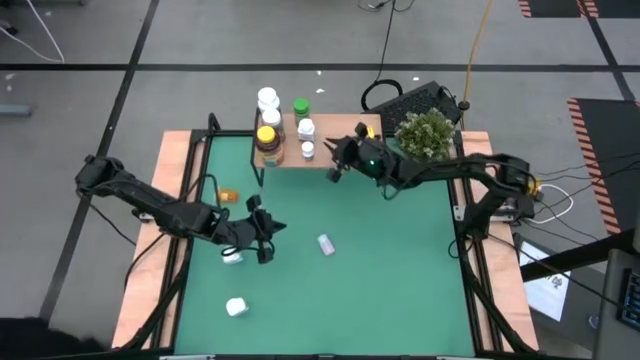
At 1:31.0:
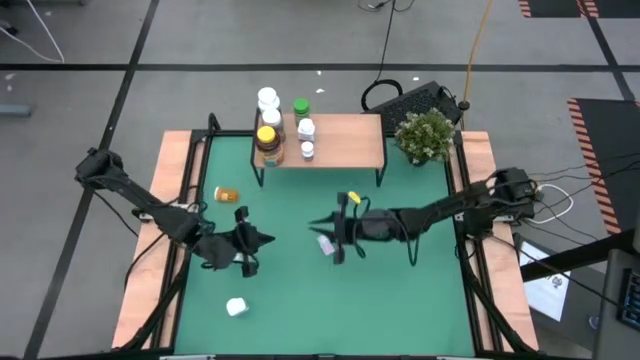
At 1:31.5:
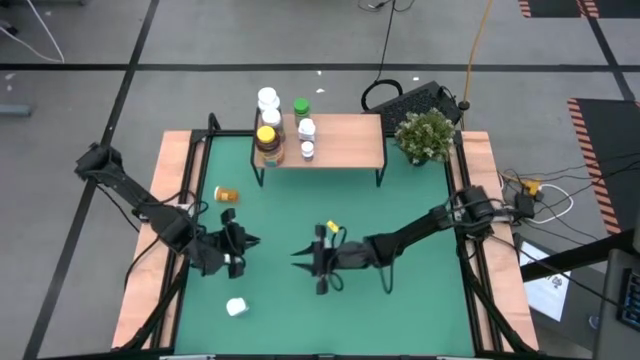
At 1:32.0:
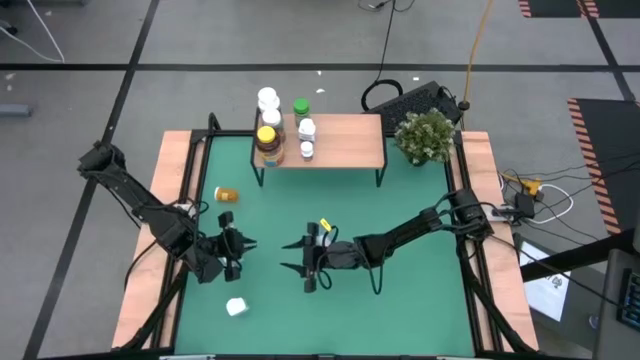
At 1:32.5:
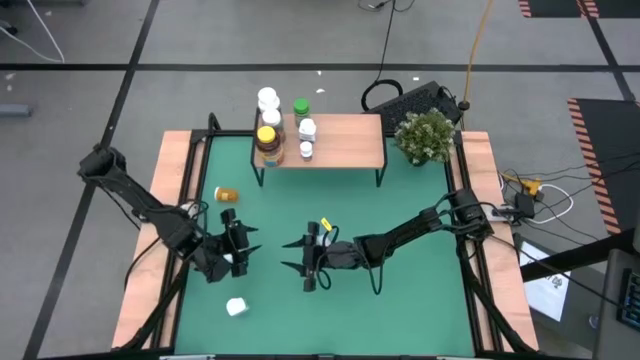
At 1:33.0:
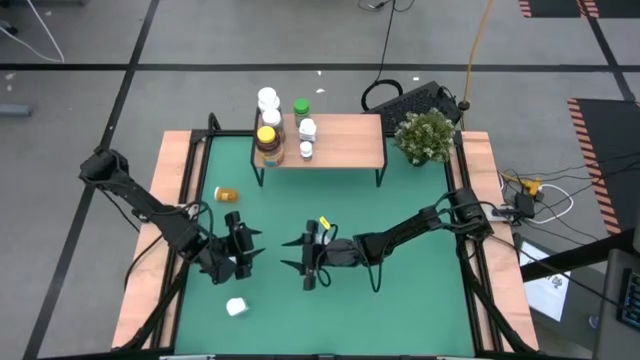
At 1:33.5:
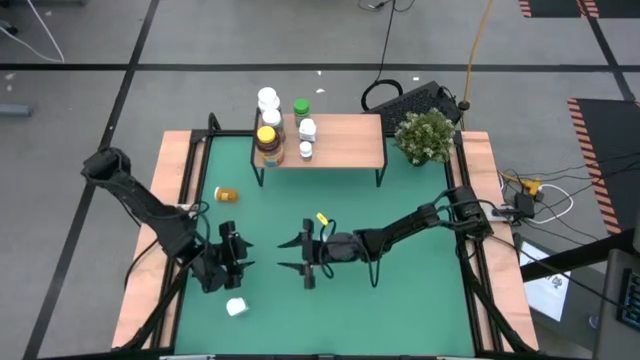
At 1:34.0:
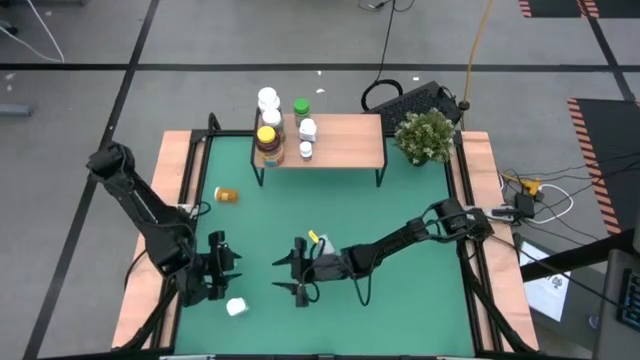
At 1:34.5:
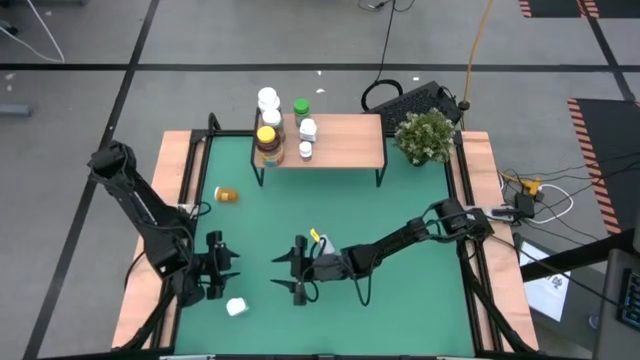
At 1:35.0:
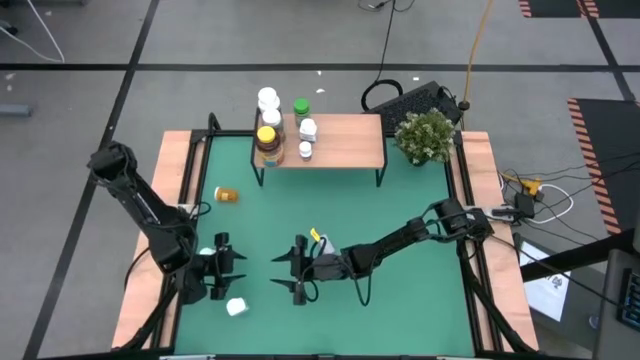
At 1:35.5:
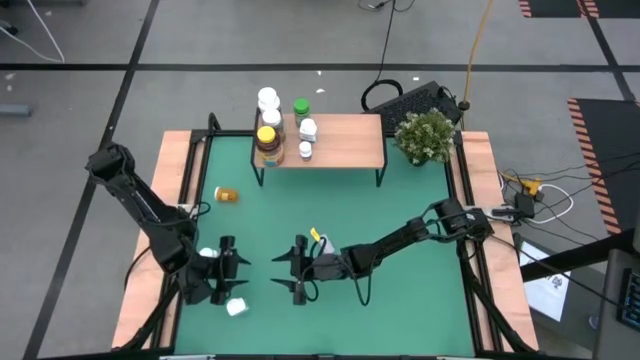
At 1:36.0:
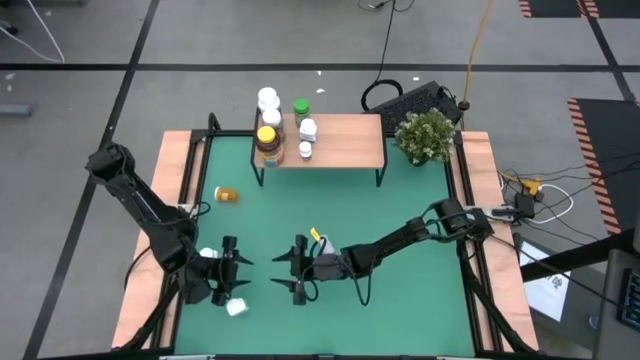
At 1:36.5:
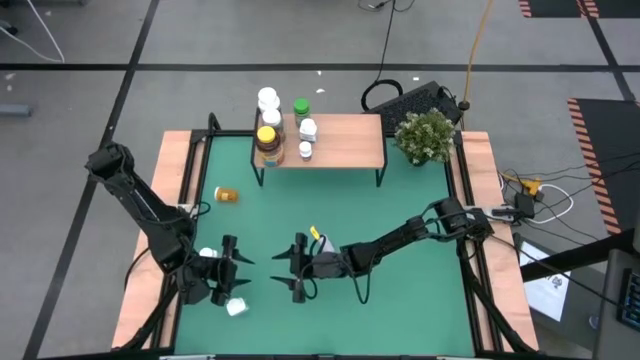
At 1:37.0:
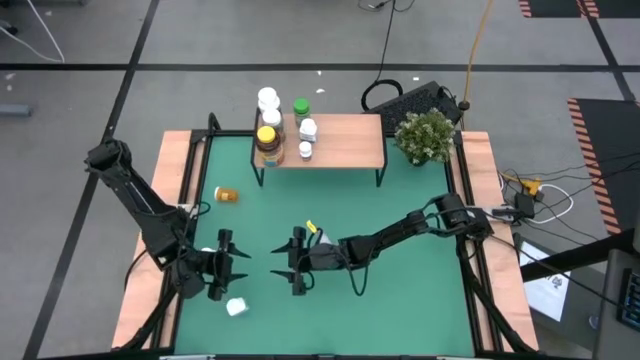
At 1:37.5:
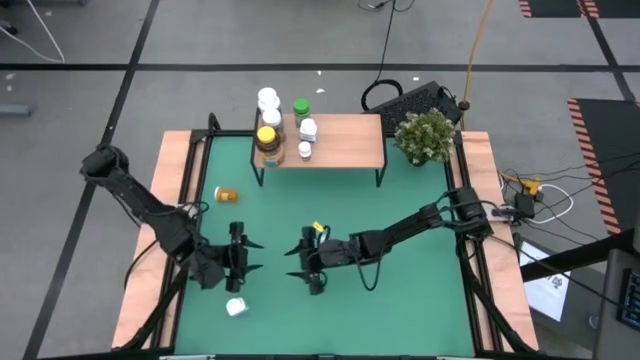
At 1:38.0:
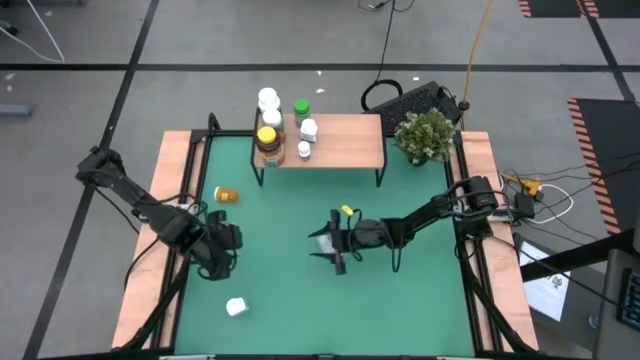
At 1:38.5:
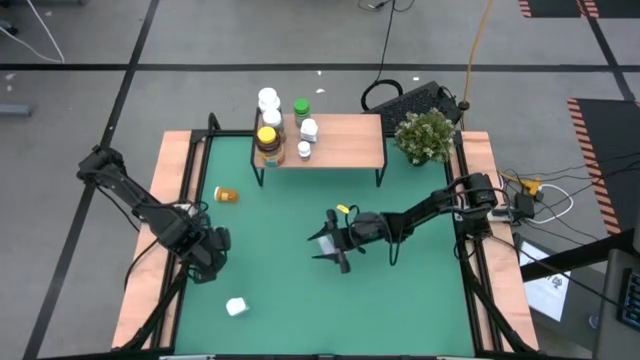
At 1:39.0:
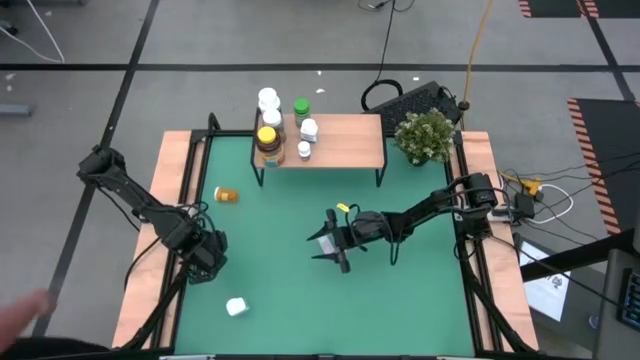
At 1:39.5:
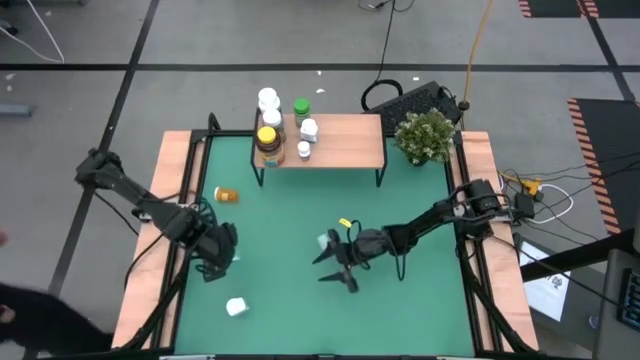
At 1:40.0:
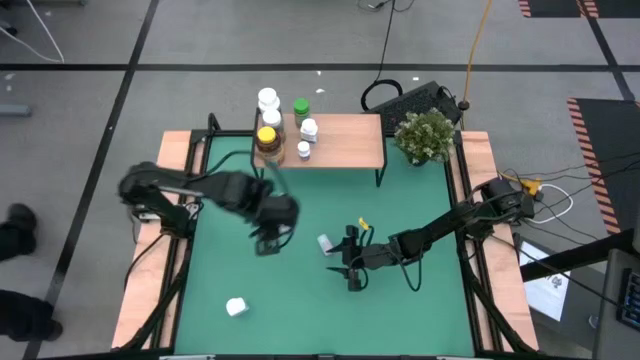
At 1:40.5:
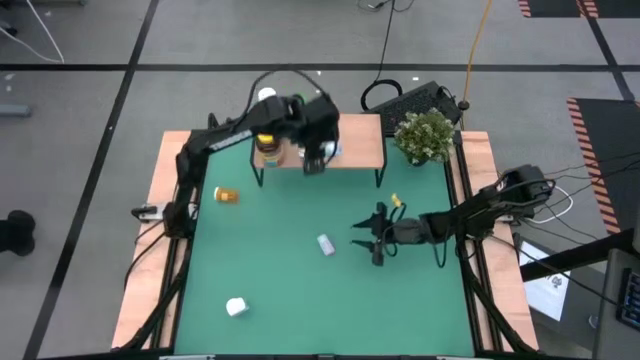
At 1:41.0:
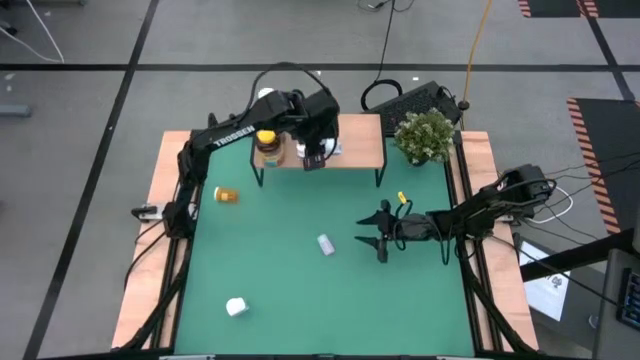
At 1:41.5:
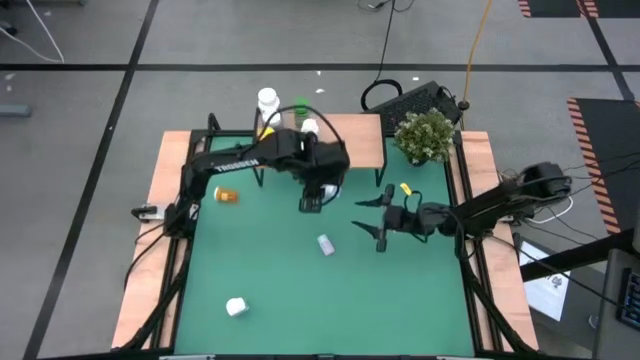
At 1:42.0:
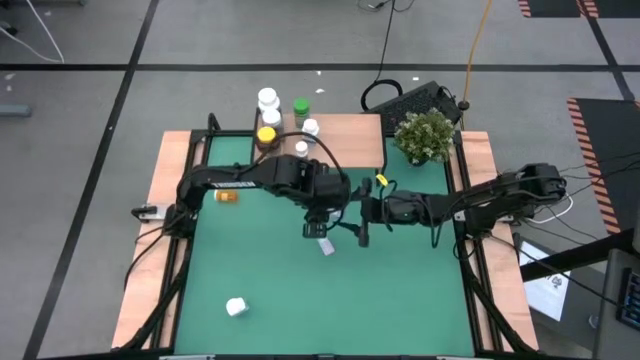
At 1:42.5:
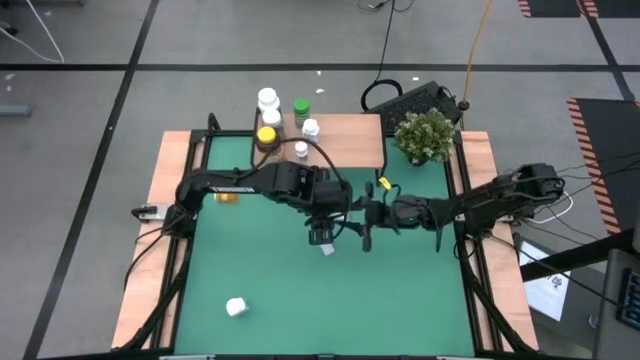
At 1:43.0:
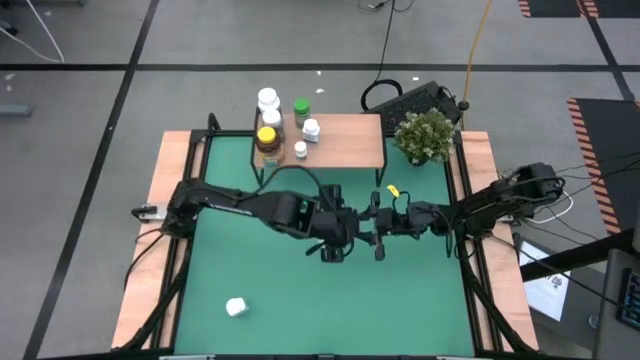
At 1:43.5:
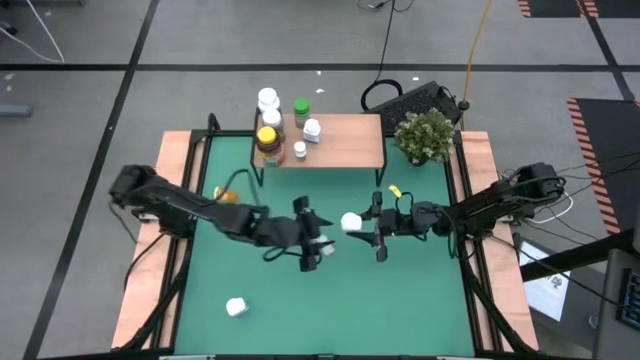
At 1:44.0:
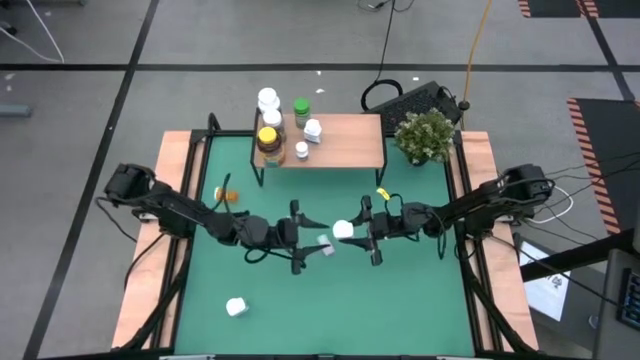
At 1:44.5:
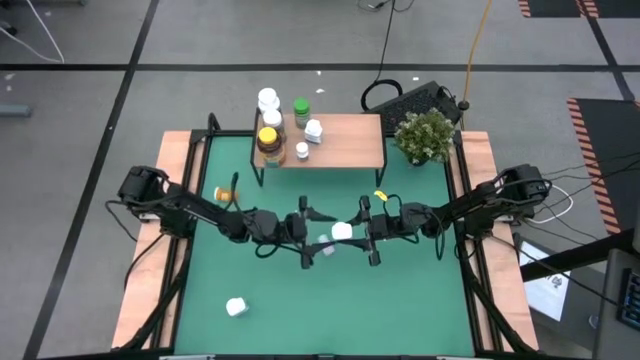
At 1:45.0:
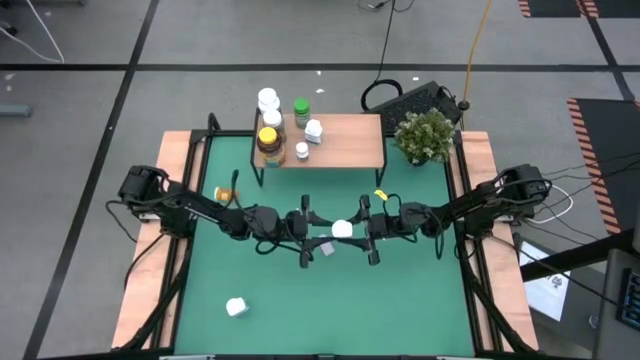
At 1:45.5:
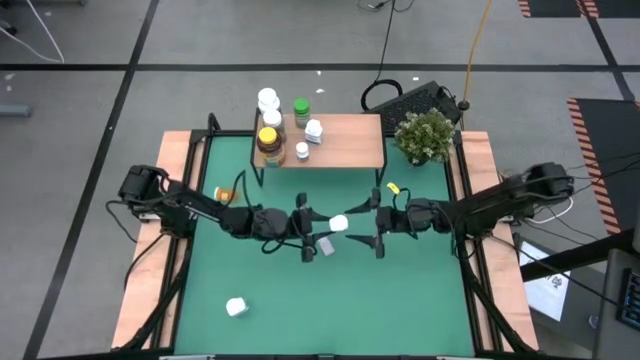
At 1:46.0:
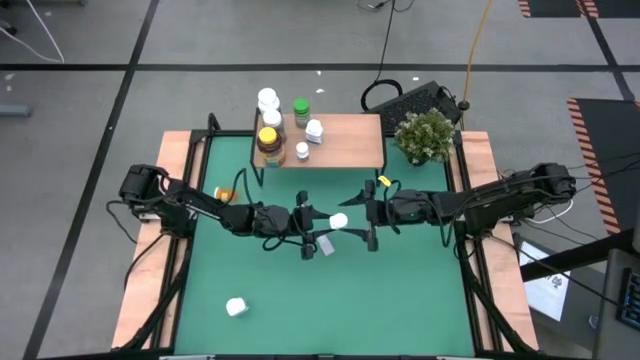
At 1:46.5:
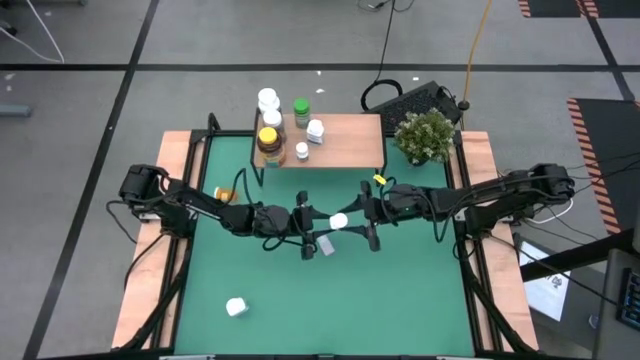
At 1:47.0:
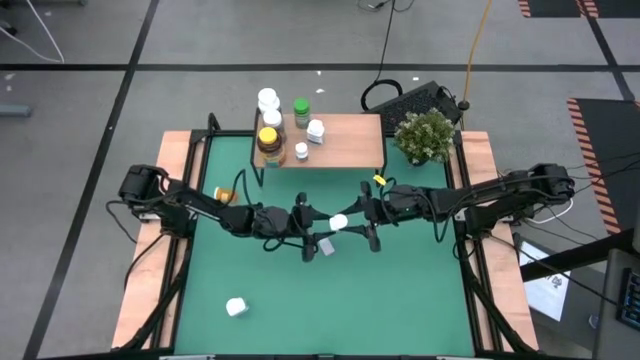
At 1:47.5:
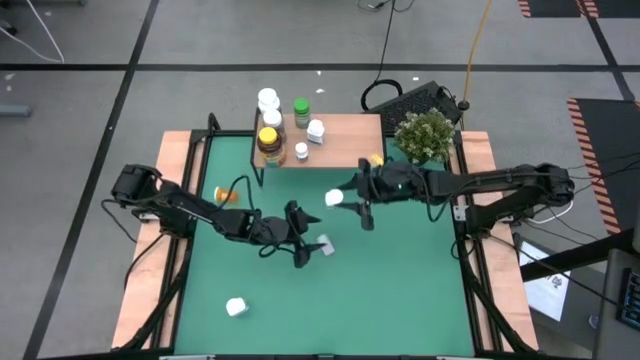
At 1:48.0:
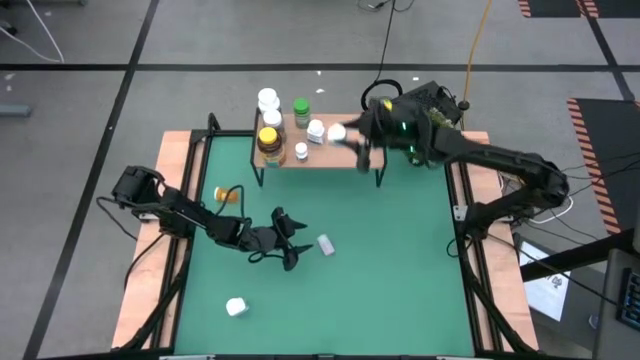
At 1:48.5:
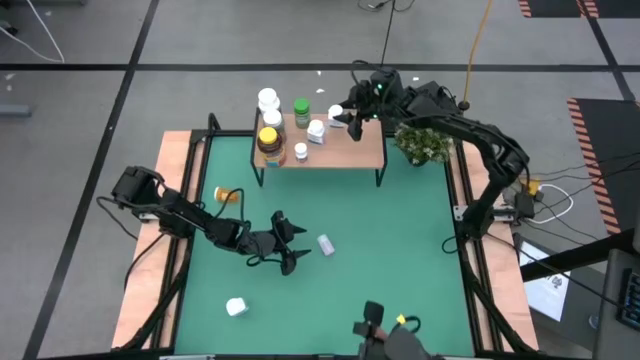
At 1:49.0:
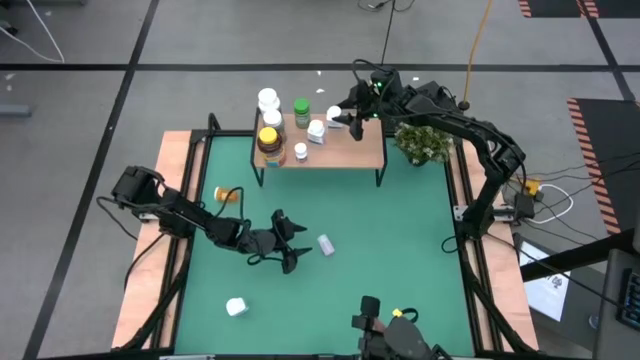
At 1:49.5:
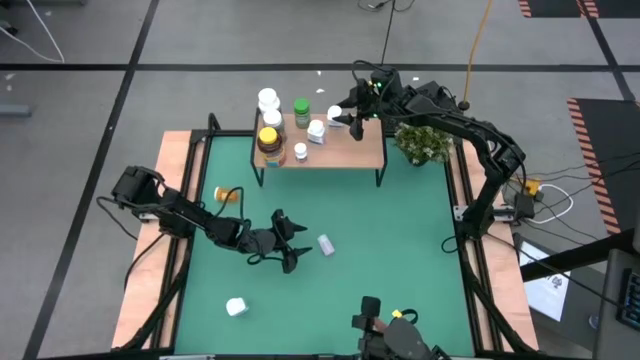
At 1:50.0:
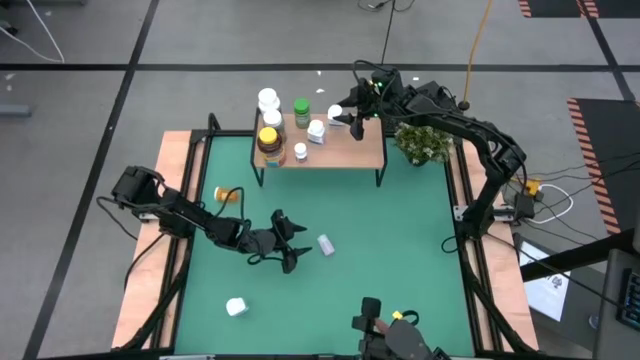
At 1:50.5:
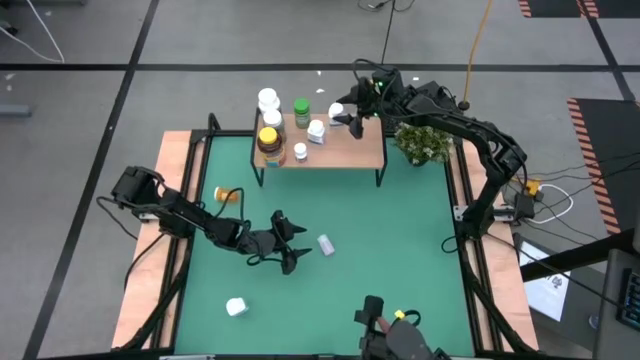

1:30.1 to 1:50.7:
Task: Pick and place medicine bottles onto shelf by color
Put the top white and blue pill bottle on the shelf

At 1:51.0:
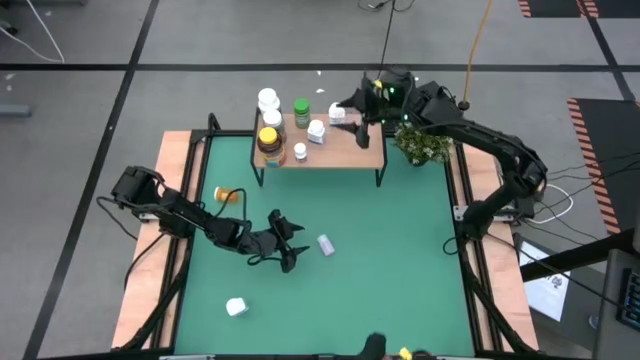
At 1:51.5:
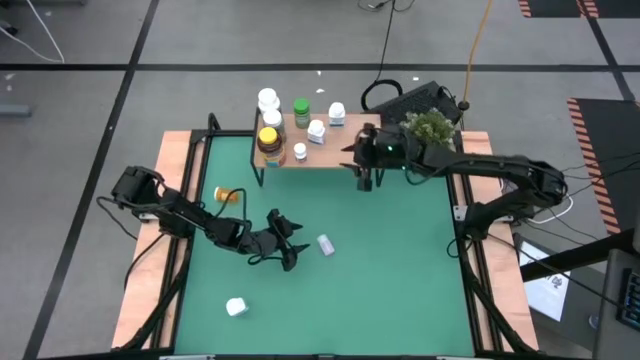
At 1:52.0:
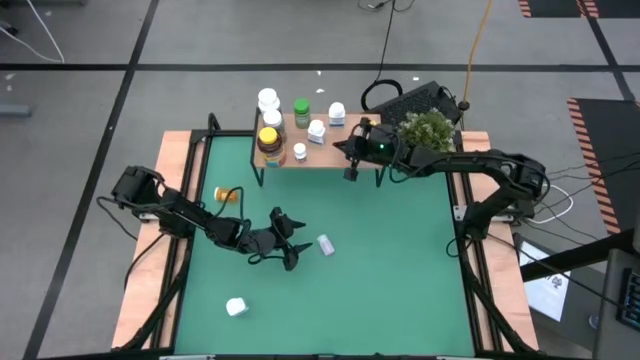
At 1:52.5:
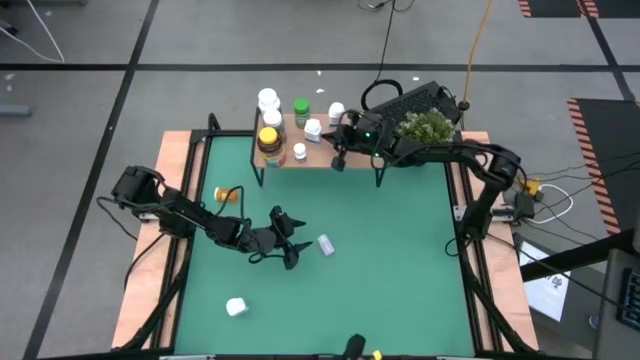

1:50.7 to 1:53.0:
Adjust the white and blue pill bottle on the shelf

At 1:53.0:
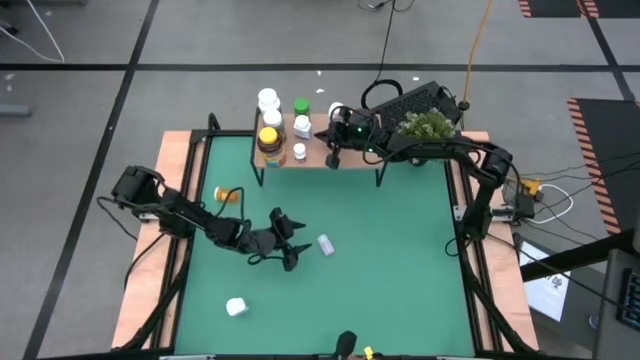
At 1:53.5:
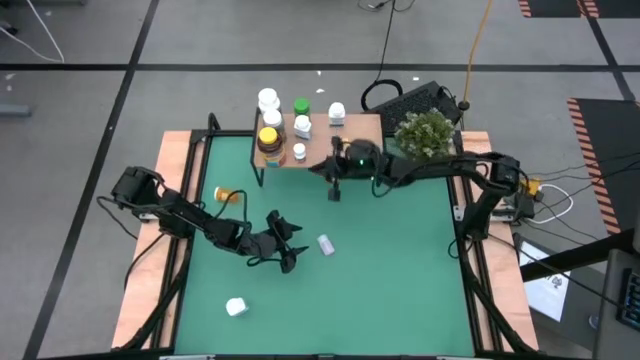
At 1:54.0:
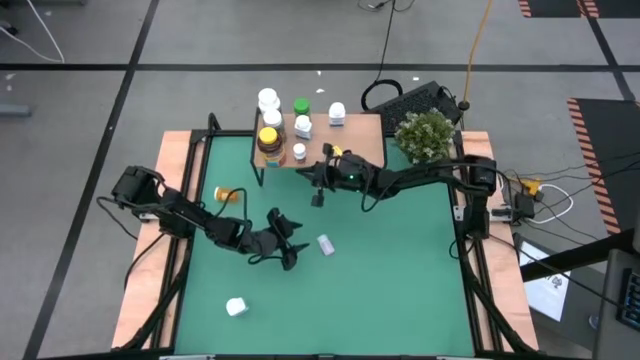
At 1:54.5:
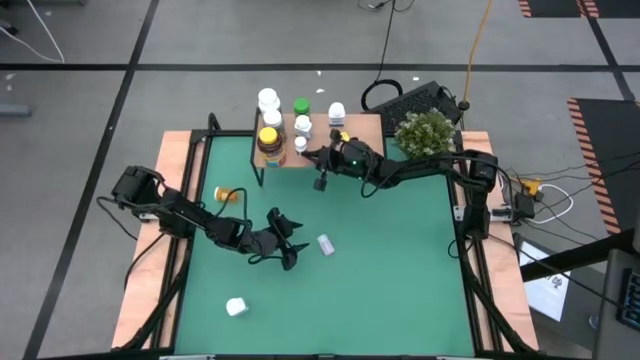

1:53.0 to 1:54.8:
Adjust the white and black pill bottle on the shelf
